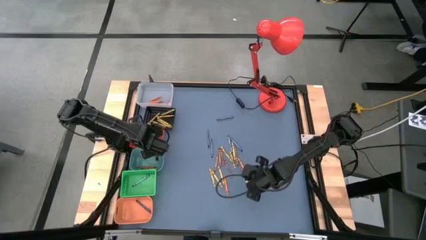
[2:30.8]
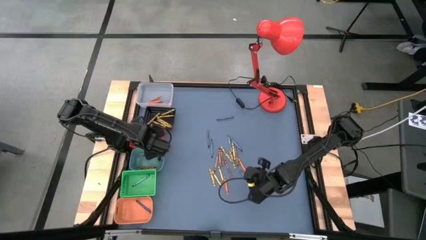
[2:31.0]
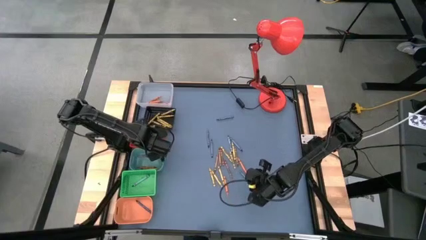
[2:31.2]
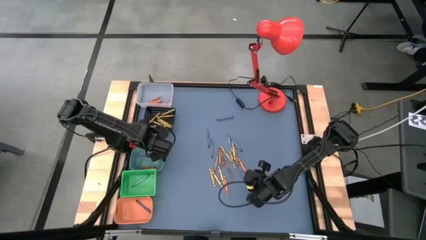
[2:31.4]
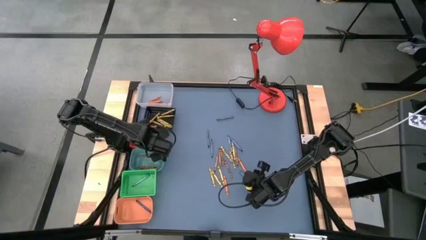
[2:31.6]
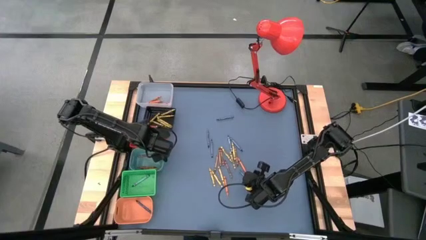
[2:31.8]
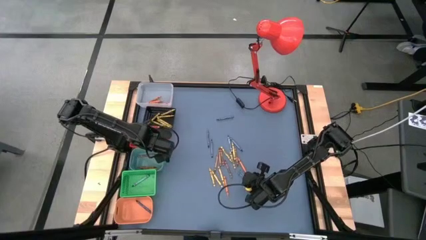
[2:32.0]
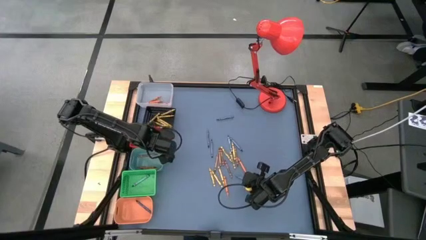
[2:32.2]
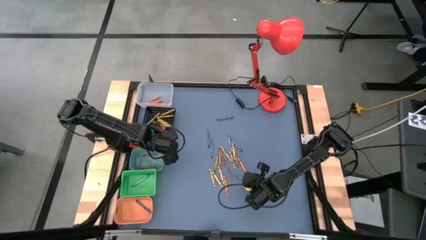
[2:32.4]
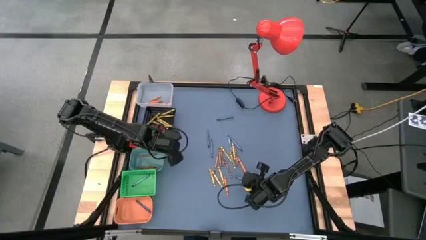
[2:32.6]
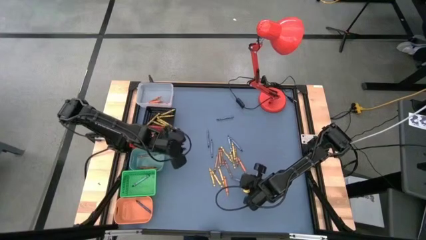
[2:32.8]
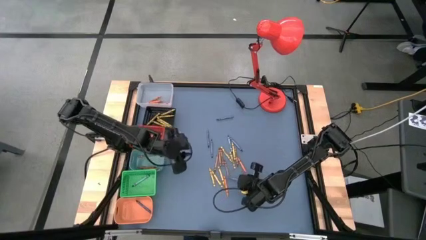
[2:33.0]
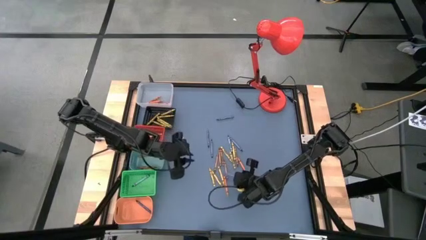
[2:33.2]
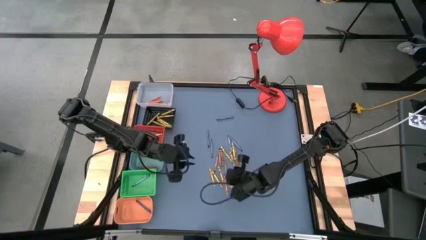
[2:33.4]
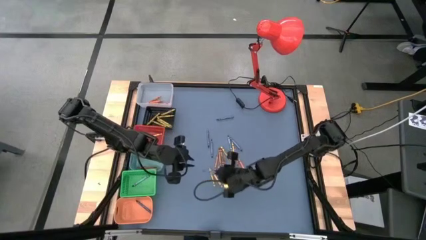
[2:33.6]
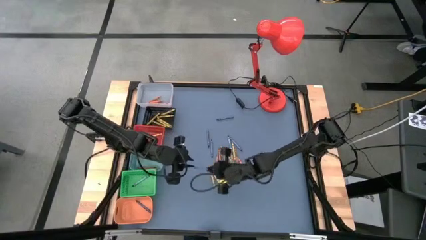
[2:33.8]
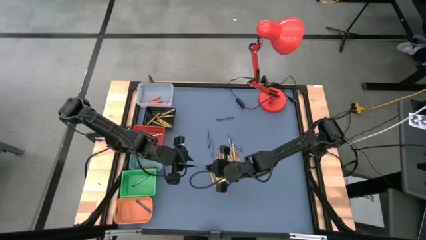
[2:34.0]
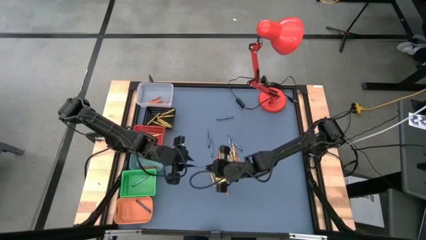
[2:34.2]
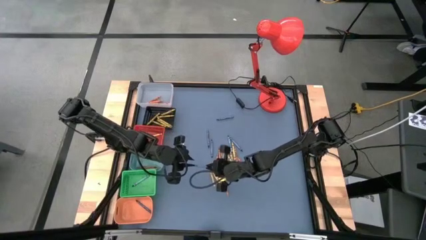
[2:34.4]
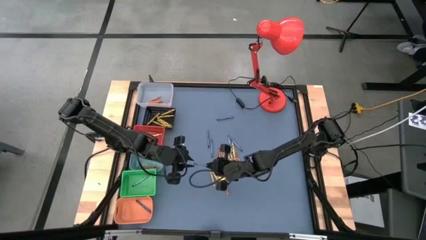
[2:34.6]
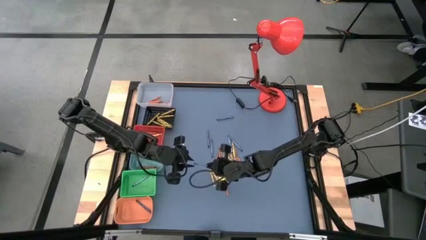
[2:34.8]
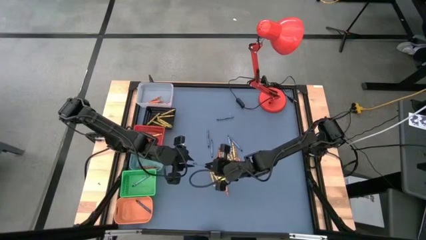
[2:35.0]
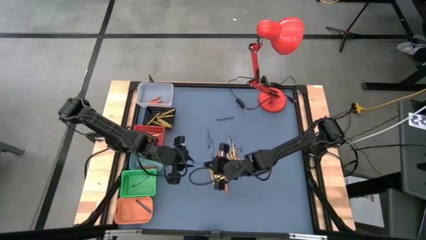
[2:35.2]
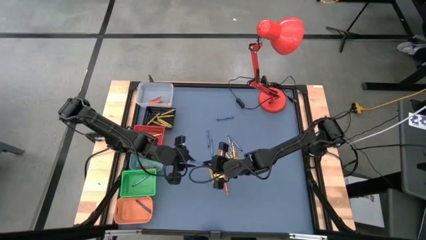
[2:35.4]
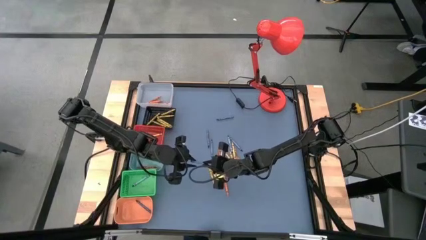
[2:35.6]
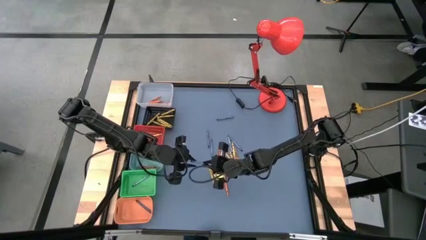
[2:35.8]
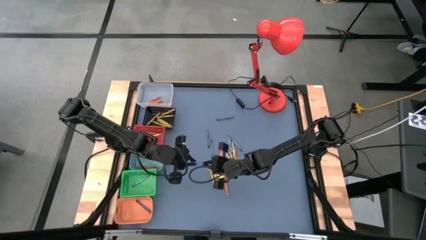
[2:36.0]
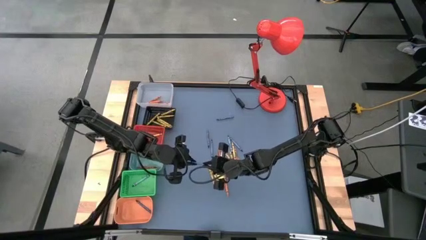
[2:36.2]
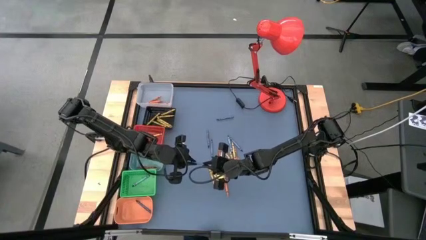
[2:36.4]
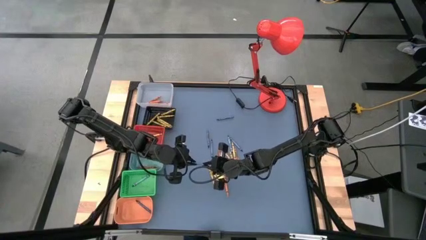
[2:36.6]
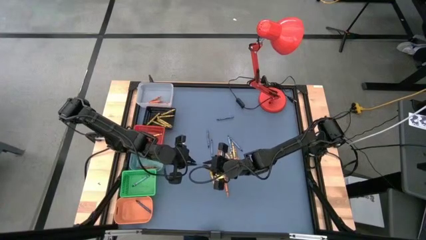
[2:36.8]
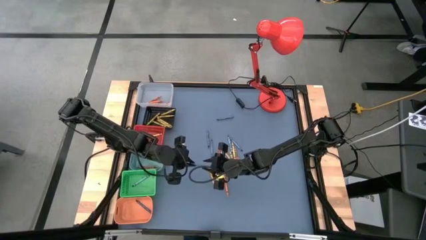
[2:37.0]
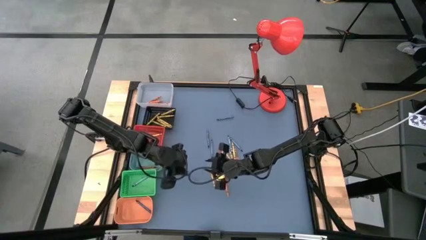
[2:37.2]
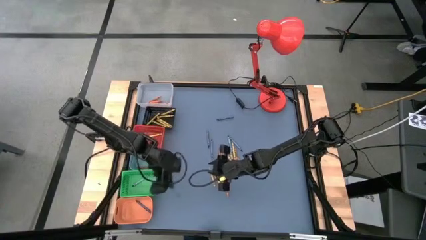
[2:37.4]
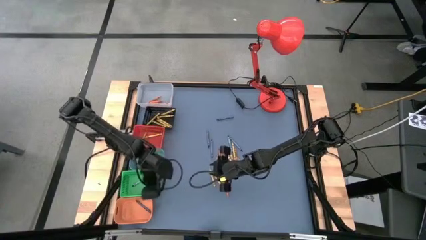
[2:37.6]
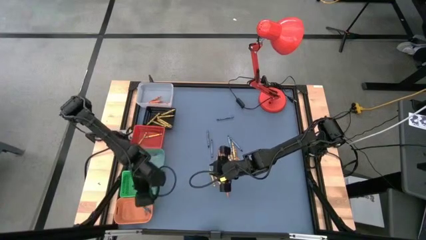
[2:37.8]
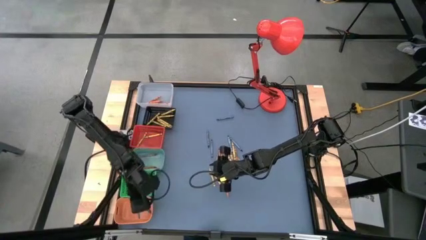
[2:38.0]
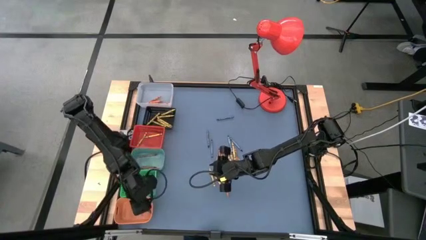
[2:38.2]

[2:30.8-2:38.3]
Task: Sort crayons
Put the violet crayon into the light orange bin

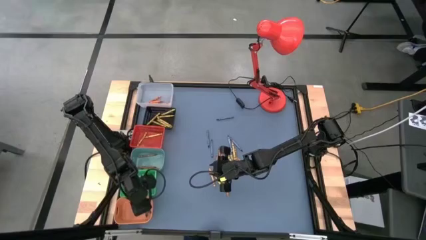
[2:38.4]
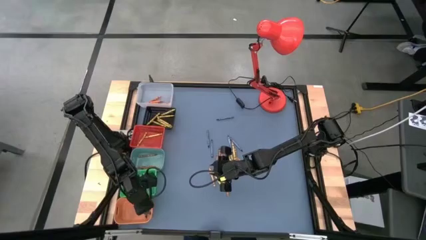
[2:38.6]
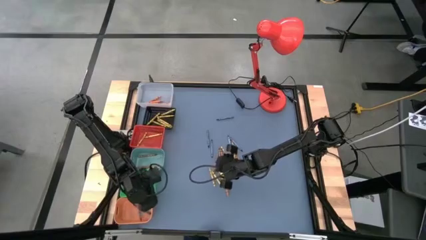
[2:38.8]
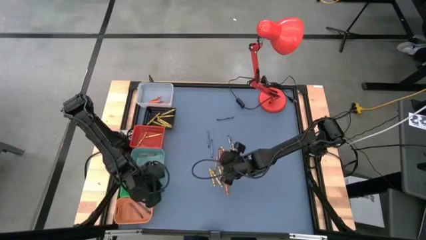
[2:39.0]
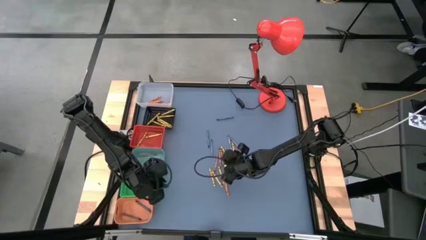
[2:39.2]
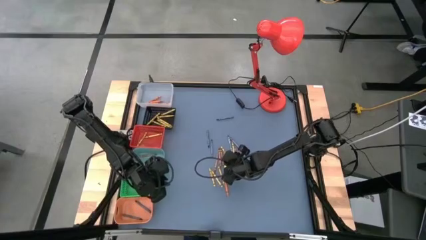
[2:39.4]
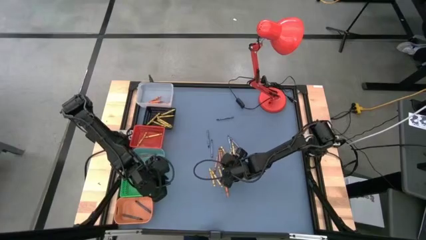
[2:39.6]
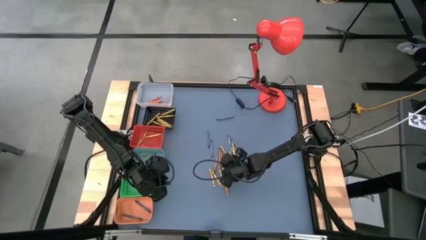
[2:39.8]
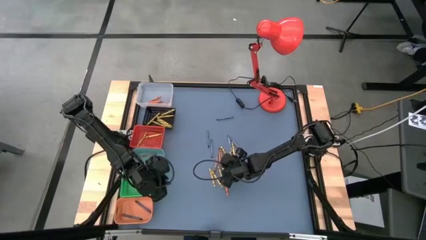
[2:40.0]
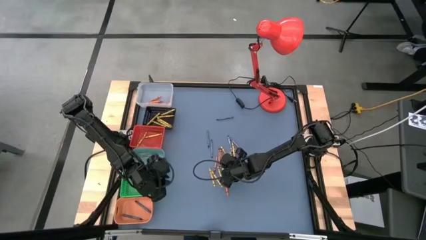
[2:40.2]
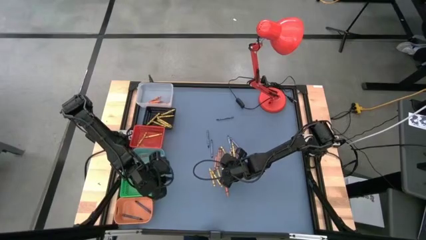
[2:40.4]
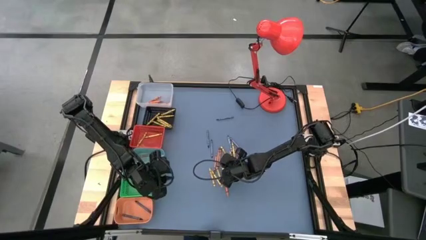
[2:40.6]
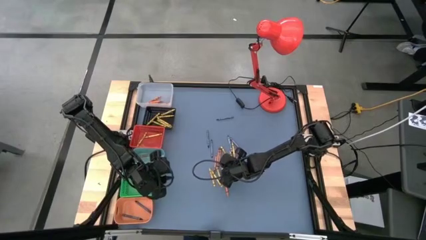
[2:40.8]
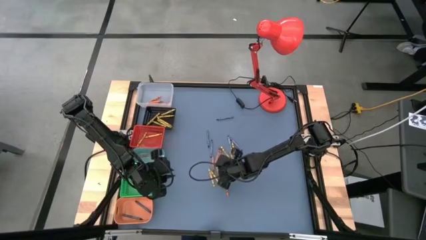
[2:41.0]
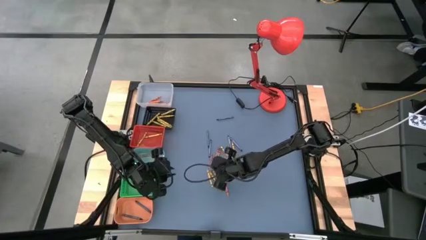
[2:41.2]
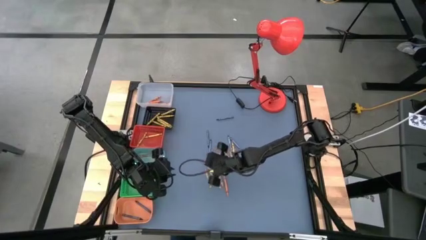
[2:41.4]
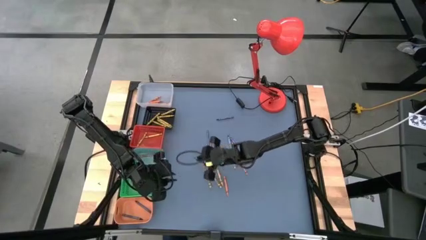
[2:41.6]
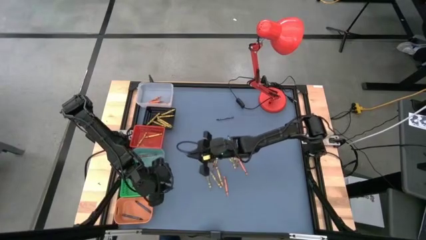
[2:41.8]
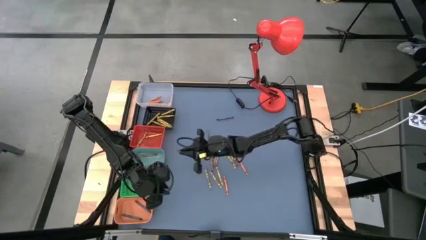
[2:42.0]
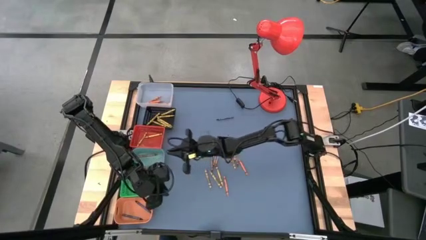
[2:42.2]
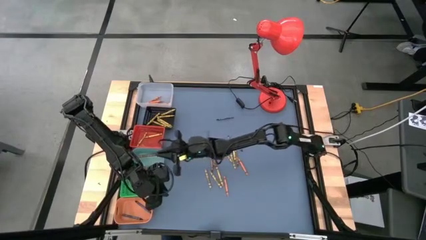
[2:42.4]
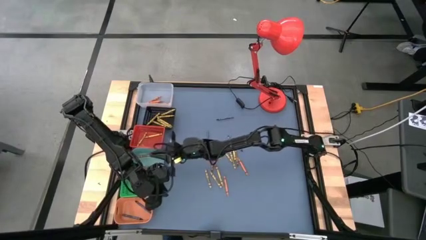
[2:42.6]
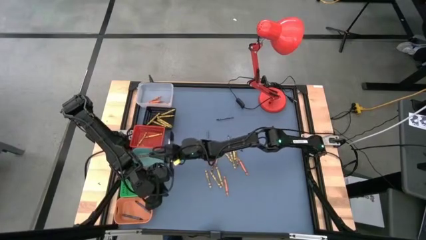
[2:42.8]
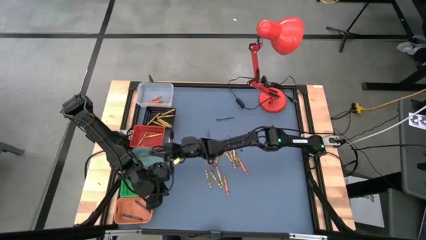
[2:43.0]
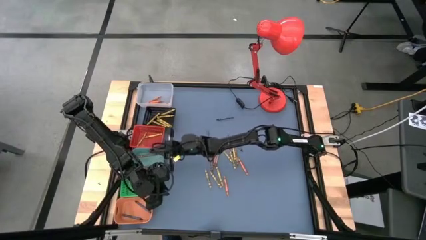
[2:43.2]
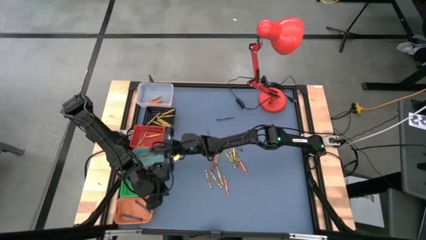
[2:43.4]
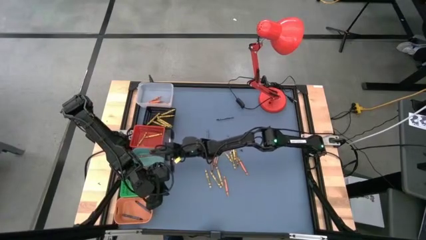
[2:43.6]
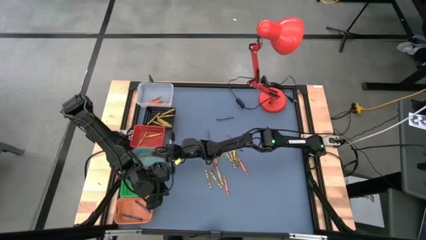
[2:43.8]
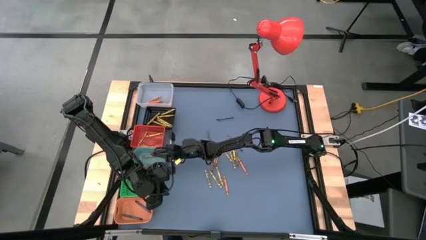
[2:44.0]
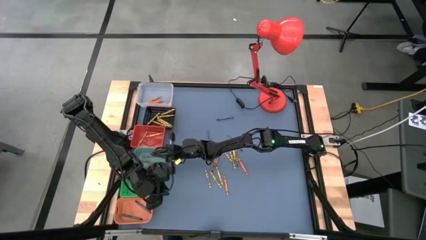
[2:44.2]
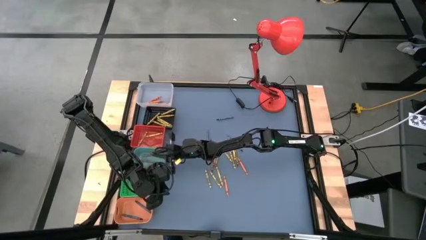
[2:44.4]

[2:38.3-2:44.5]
Put the brown crayon into the blue bin

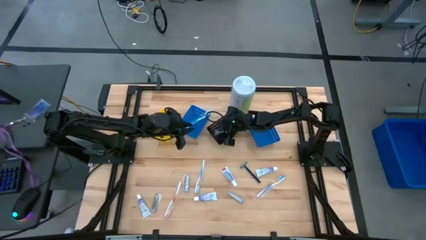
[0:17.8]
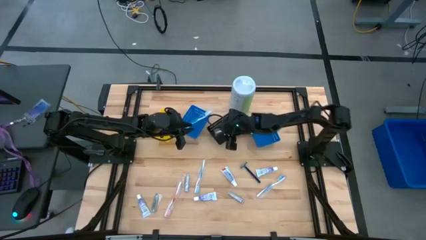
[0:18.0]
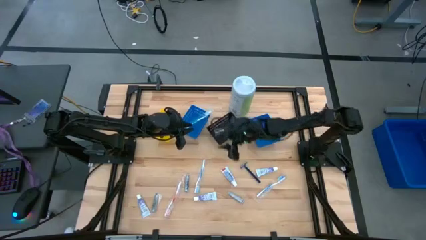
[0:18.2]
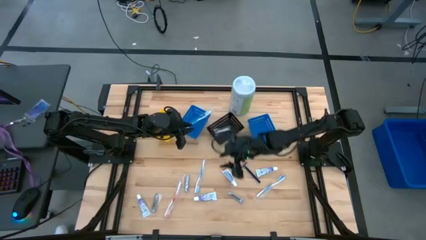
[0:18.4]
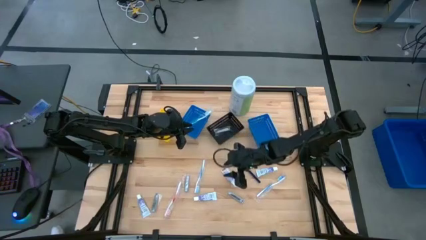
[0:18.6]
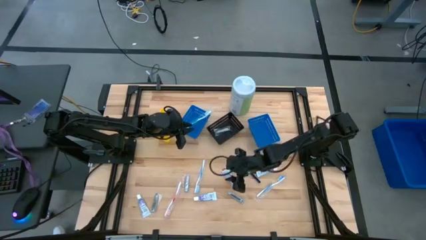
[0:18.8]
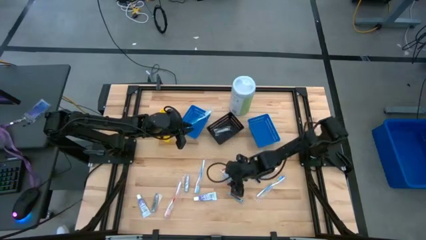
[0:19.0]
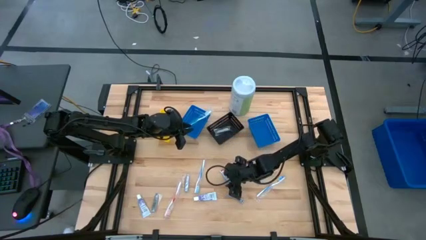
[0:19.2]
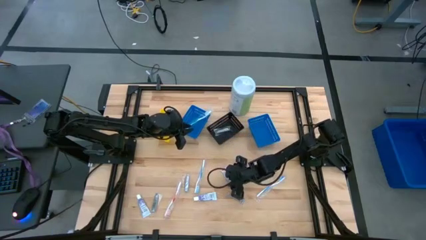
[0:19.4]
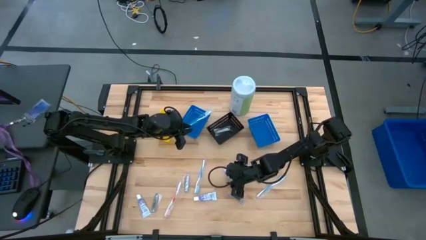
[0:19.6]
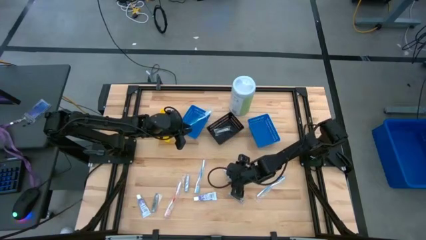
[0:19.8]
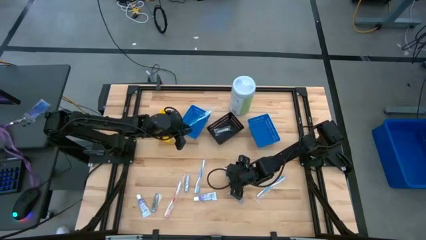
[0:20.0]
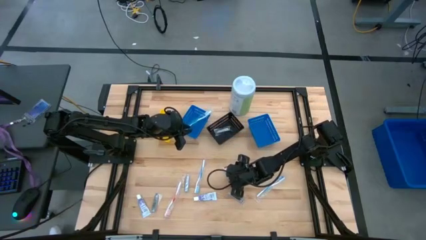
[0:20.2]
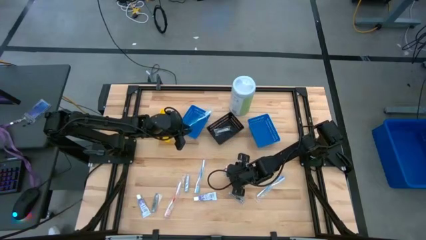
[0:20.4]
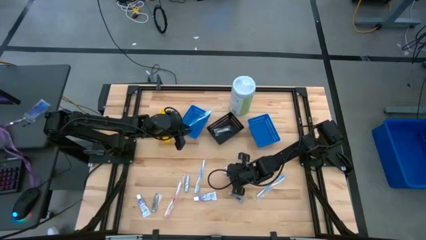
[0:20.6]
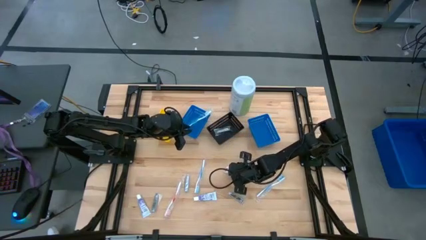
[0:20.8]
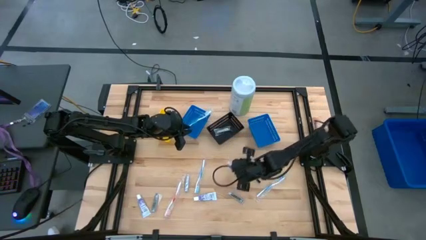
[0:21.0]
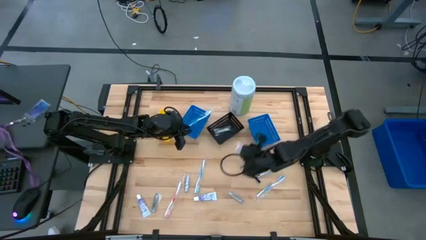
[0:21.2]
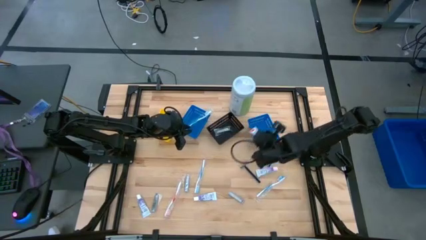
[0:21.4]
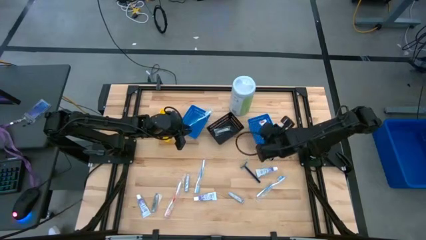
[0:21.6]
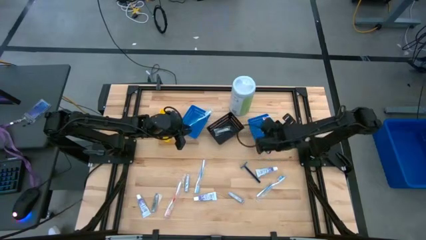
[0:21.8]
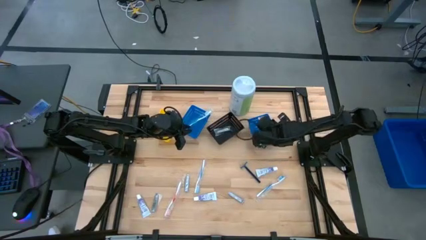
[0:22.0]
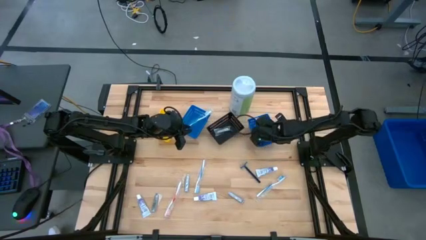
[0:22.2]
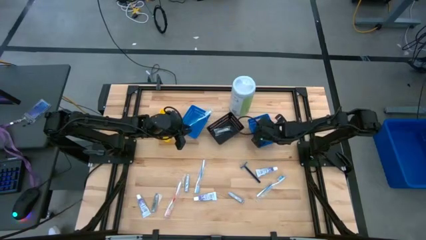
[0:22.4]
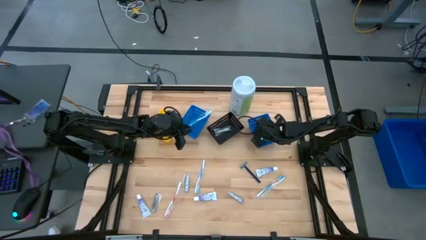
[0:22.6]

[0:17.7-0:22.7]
Task: Pick & Place Travel size toiletries
Put the white toothpaste into the right blue basket
